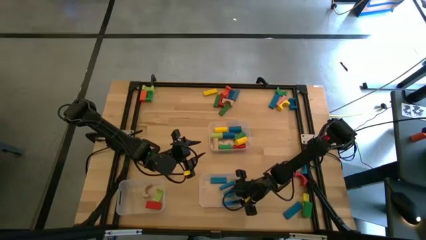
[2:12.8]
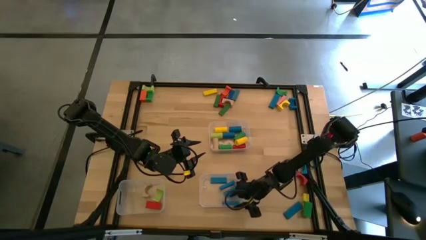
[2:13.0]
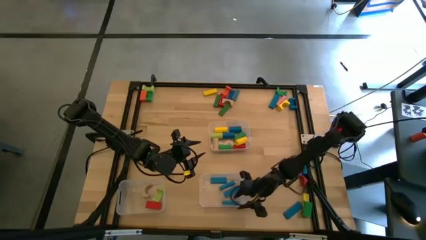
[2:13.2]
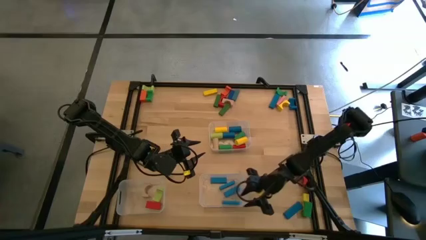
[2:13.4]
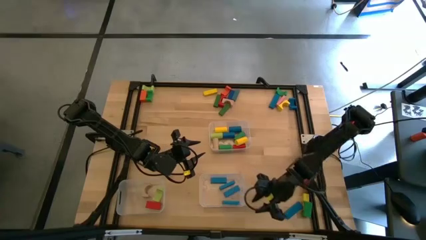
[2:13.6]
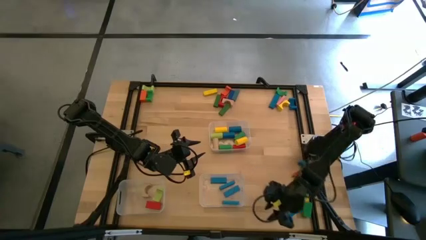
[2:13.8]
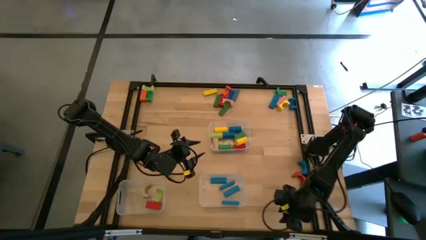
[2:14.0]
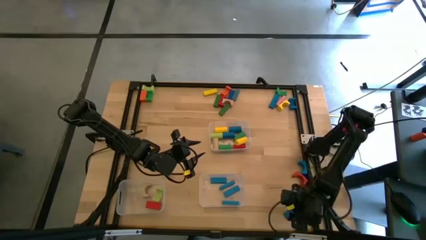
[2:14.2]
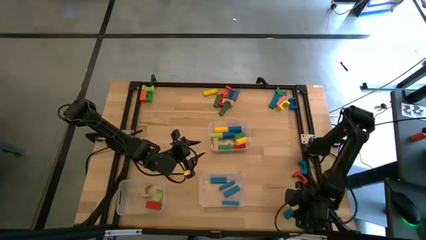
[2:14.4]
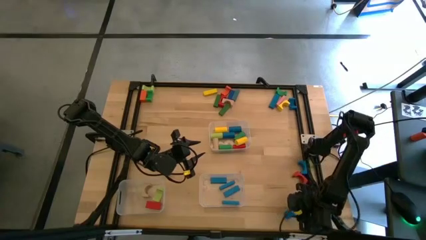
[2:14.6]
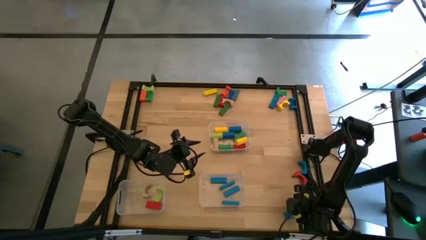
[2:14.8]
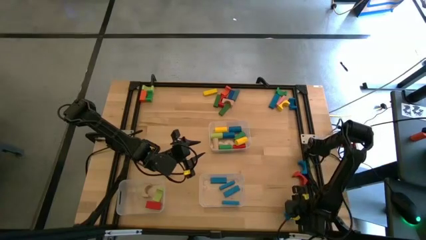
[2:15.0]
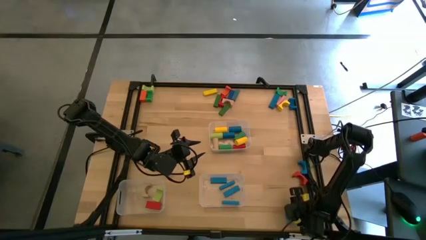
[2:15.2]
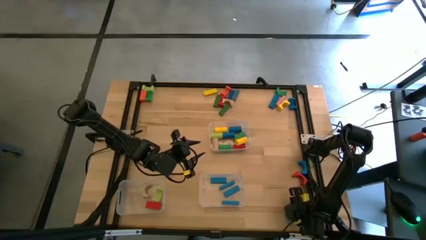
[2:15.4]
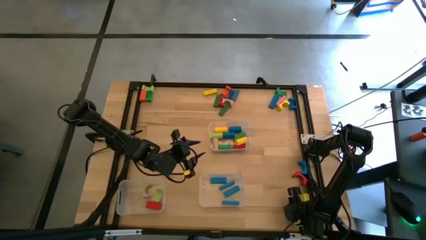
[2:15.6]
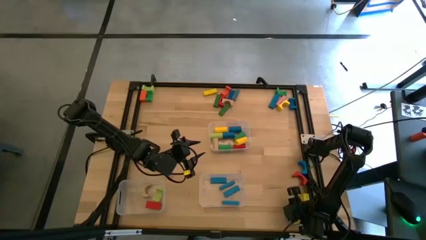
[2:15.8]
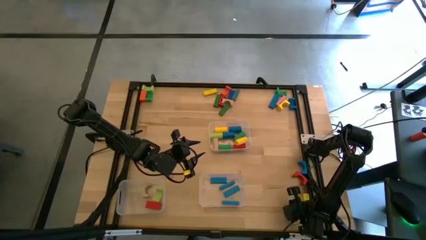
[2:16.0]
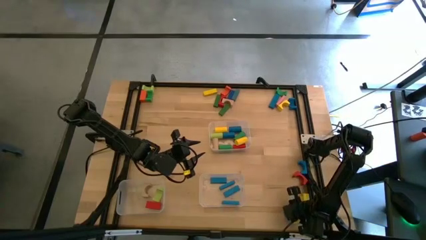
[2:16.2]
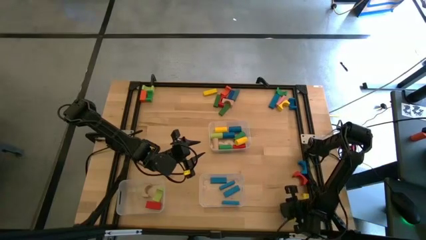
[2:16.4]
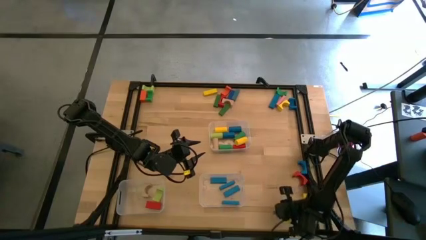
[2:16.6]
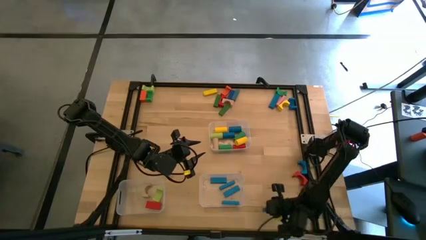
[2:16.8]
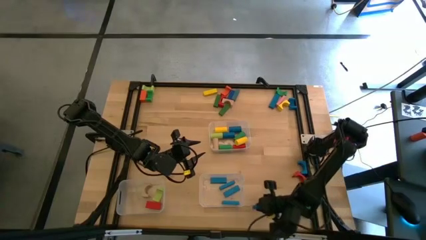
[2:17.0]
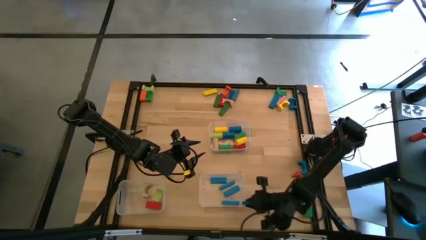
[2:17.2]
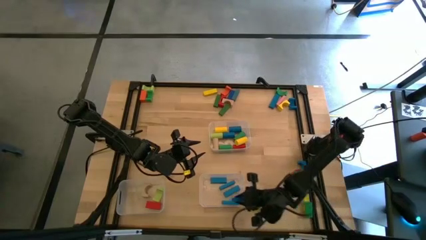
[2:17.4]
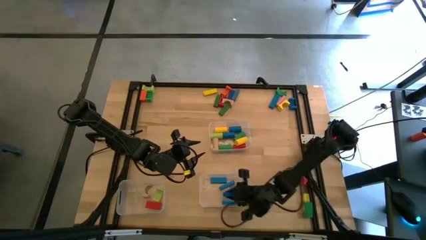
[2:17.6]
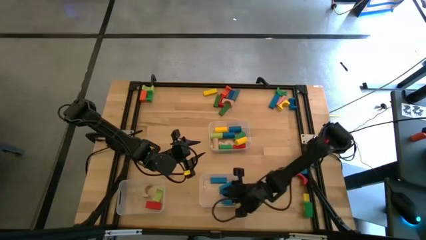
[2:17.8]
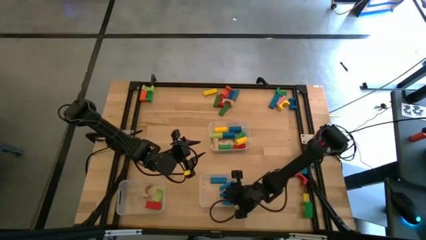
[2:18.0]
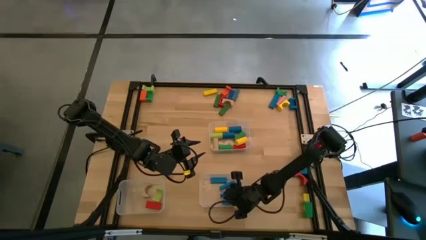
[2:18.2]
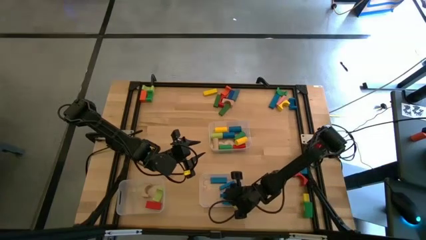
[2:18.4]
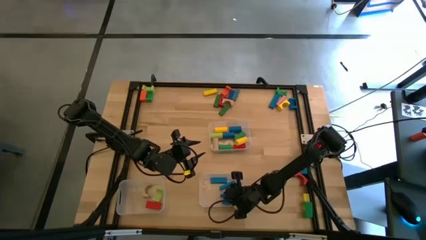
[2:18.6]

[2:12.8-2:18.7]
Task: Sort blocks by size
Put the blue rectangular block into the bottom right transparent bin

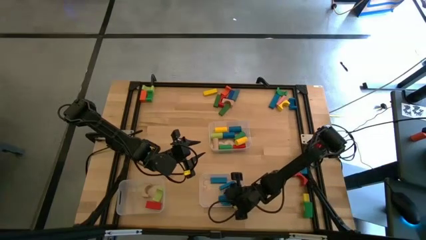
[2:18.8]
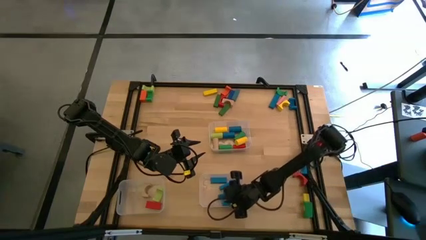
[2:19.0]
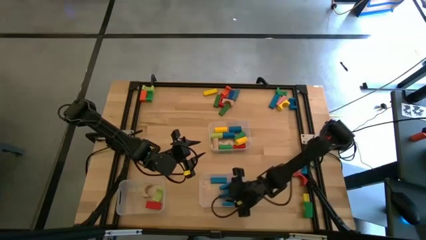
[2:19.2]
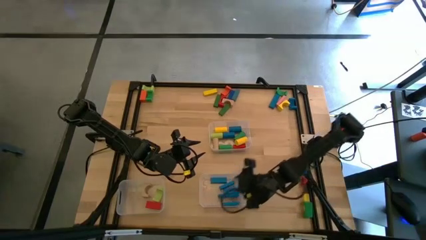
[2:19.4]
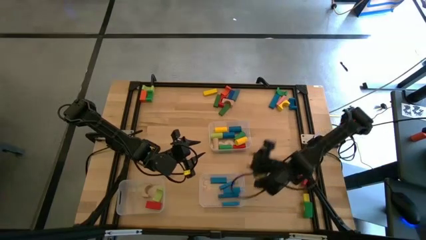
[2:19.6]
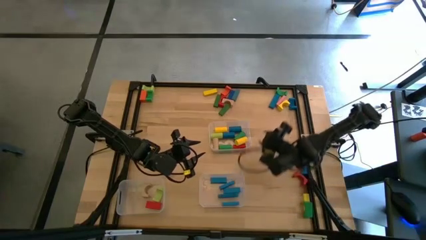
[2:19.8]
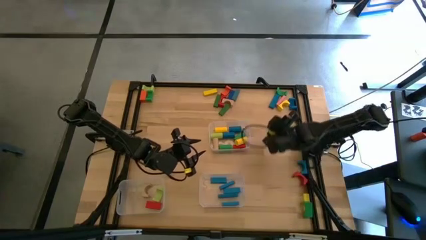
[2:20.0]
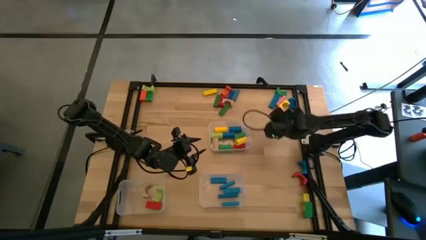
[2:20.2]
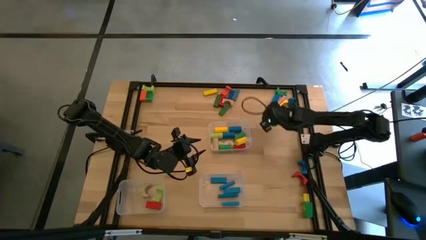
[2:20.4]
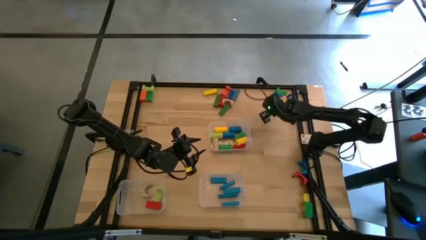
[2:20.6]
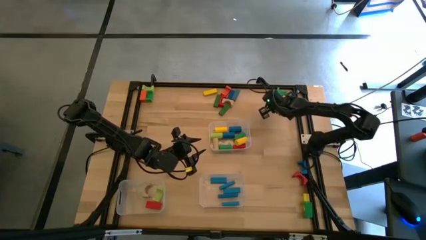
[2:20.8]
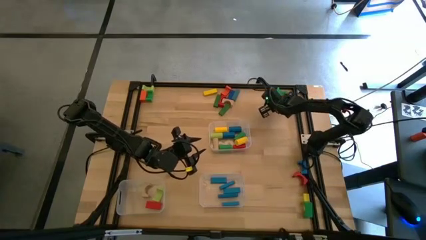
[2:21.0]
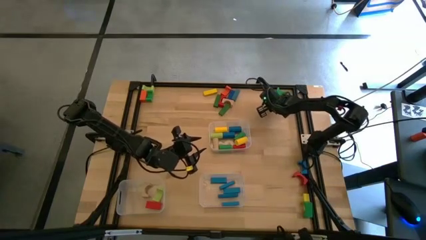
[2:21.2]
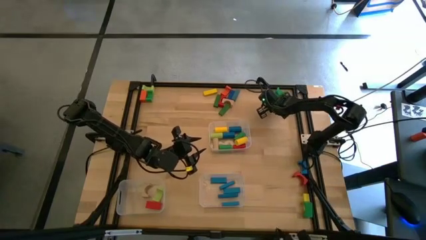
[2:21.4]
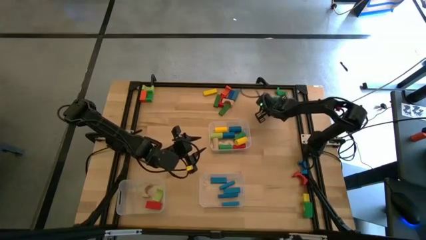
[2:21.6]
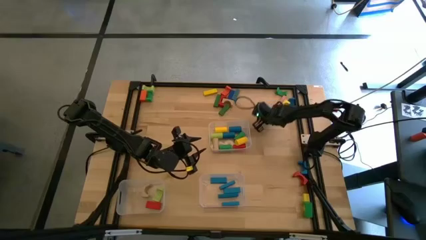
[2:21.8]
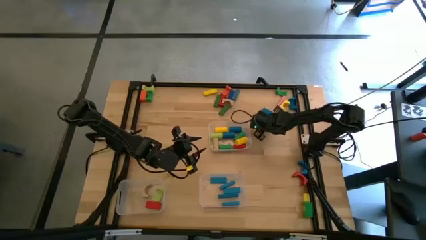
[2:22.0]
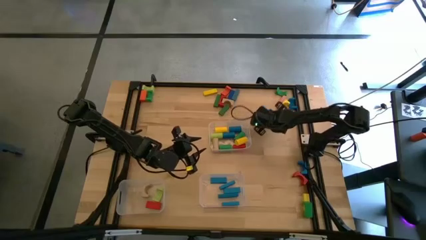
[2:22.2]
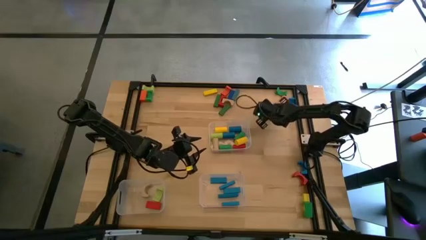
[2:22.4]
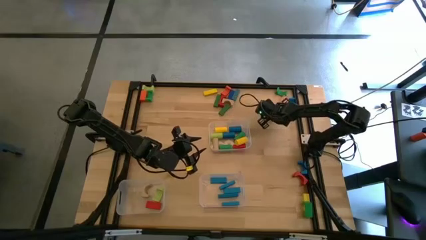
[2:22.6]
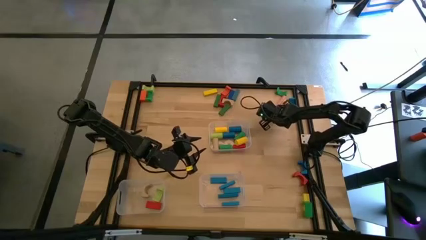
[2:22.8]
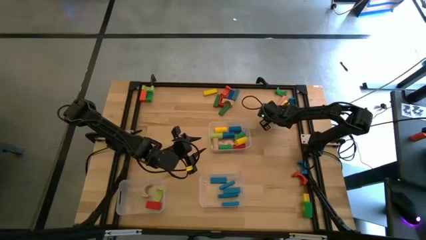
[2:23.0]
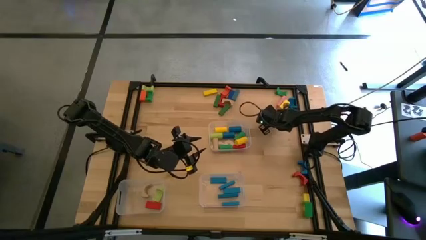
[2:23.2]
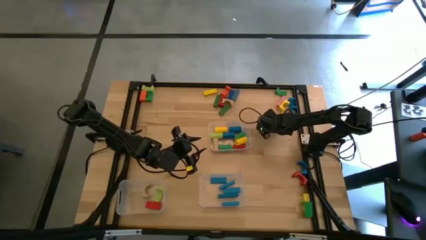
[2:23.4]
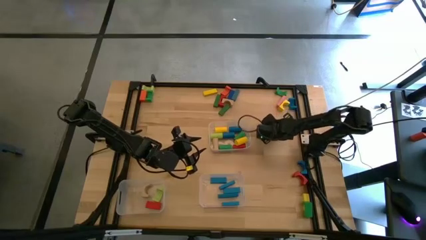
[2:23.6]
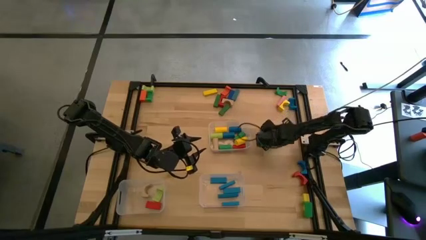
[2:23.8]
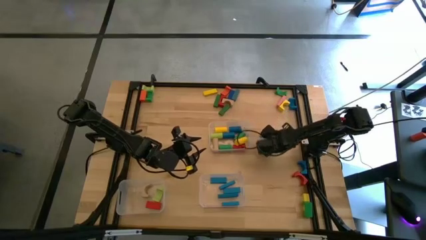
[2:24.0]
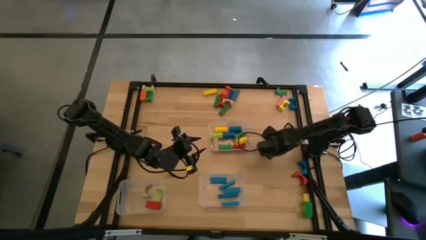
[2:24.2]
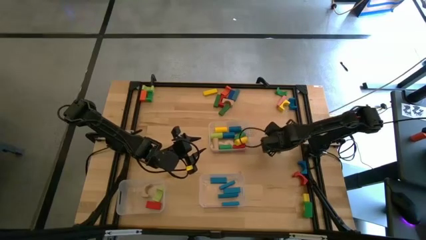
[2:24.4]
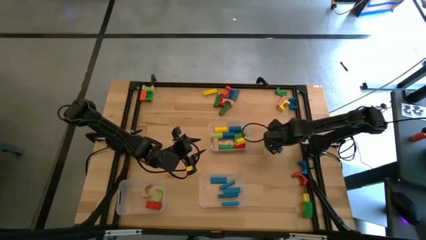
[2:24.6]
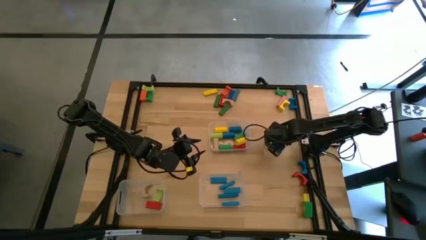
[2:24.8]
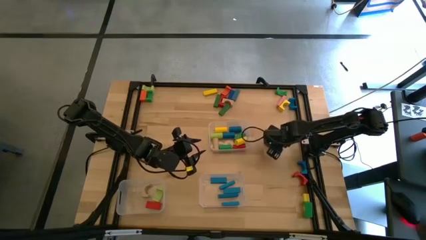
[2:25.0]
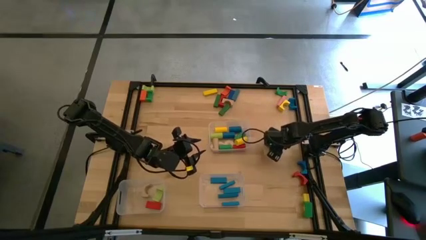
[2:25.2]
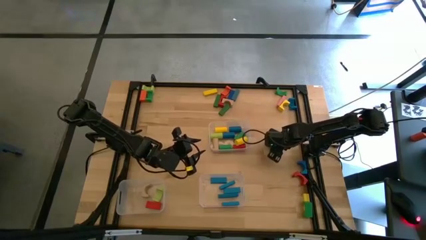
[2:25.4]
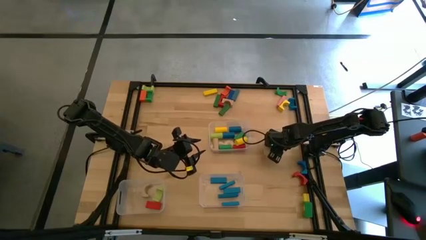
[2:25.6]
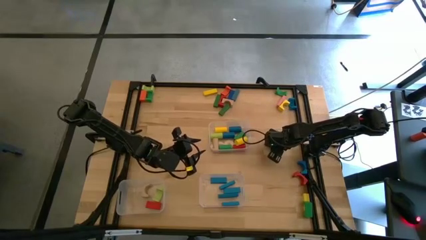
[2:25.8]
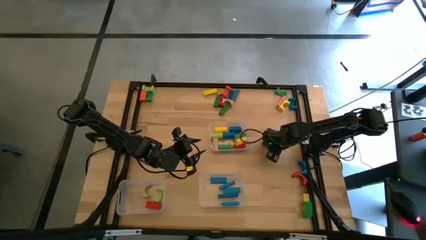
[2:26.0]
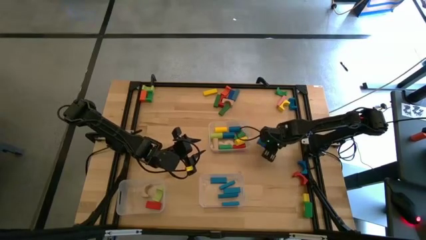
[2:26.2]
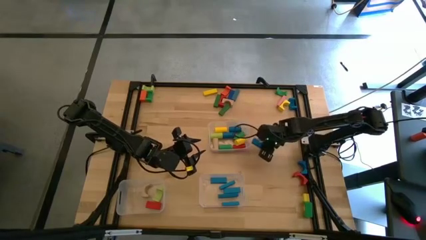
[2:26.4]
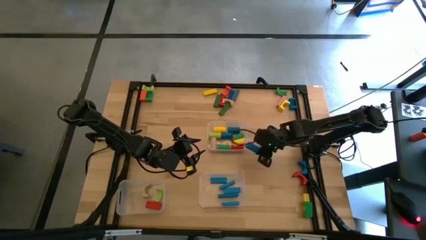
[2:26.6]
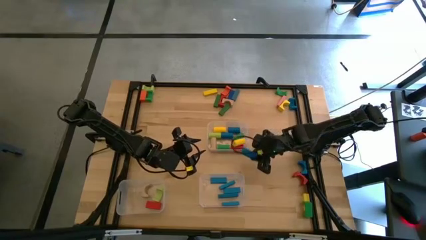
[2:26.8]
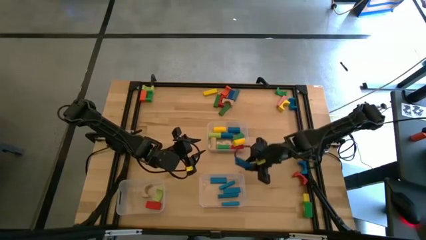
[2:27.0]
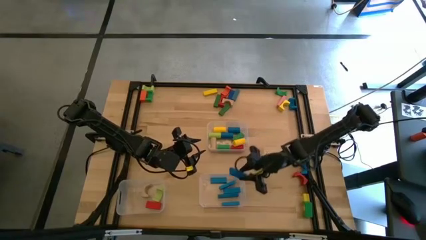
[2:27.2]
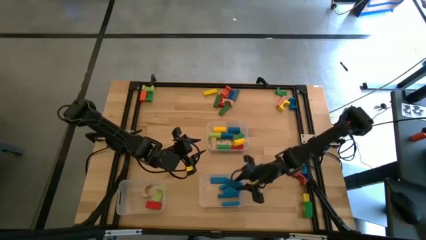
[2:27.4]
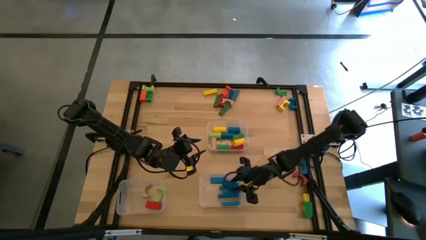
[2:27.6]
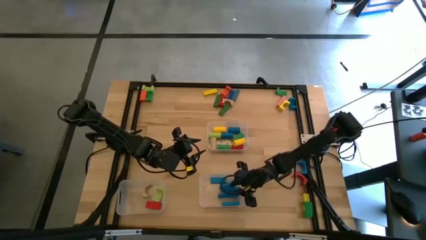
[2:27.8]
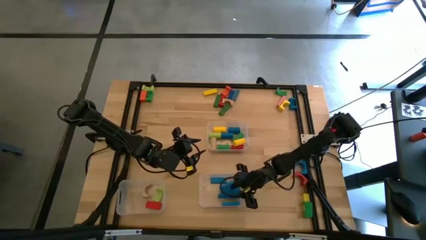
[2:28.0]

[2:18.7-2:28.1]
Put the blue rectangular block into the bottom right transparent bin

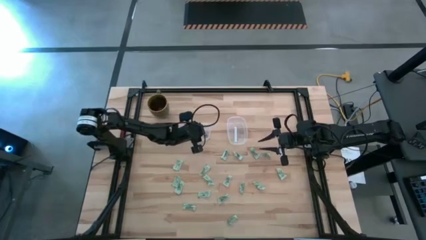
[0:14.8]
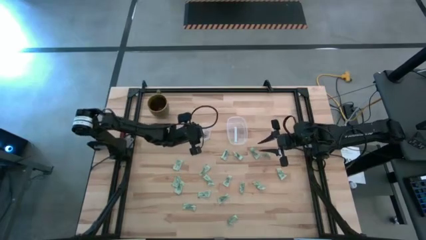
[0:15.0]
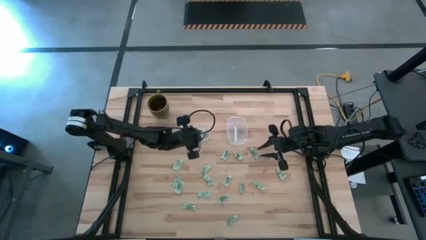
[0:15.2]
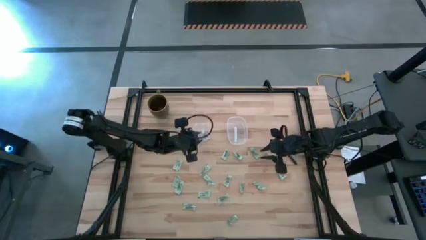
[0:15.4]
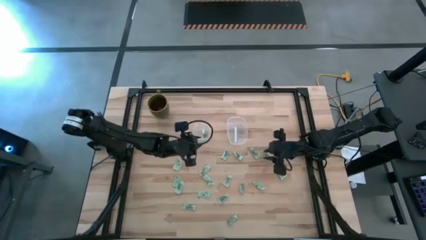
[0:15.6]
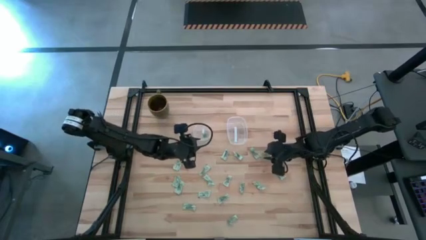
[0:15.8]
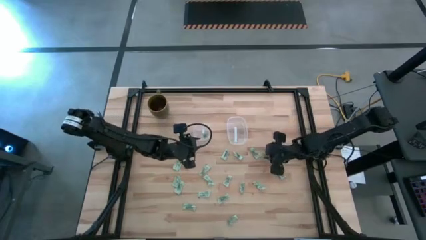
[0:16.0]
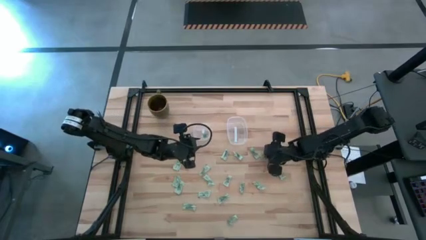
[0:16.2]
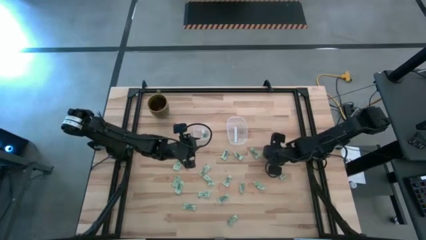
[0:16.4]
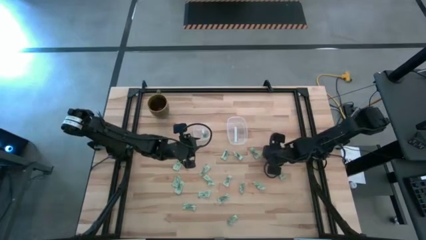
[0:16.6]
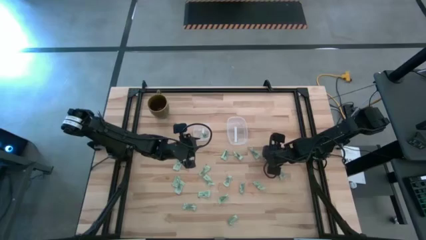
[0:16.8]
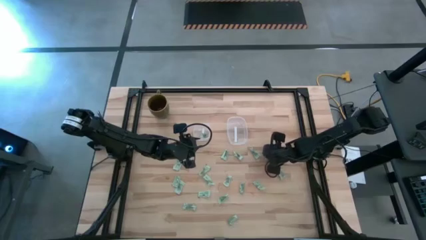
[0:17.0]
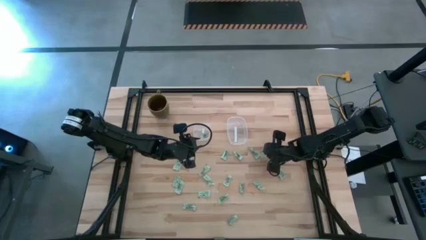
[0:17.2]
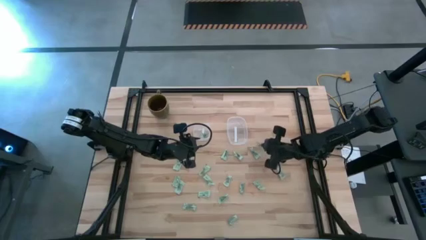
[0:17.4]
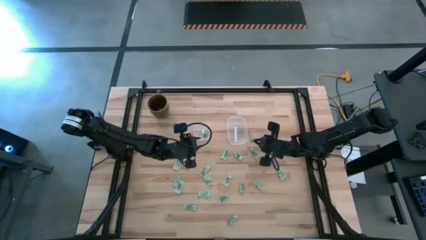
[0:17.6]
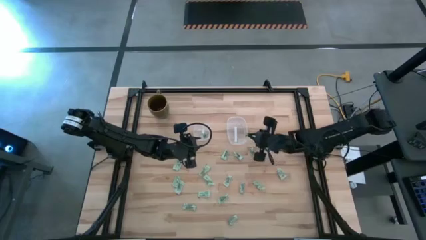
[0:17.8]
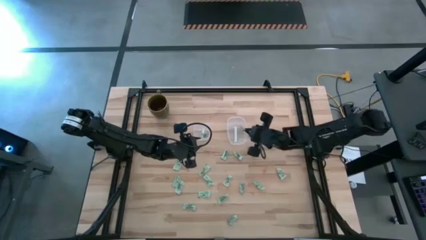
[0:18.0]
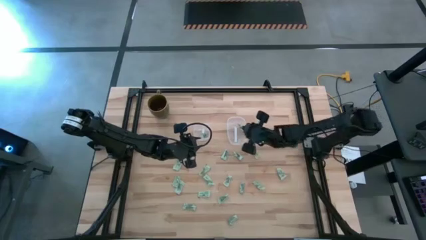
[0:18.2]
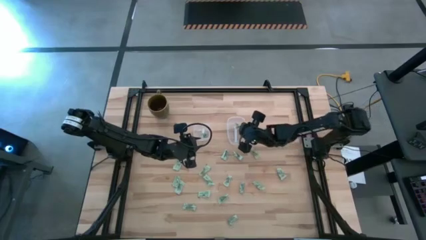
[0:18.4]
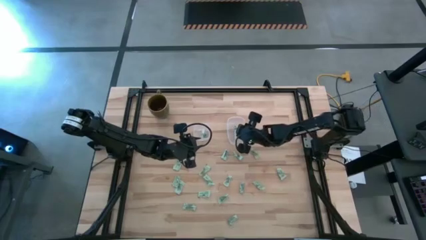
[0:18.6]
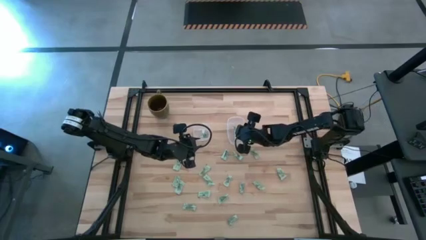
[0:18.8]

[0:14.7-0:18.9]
Task: Pick and place items into bin
Put the light green stevia packet into the right transparent bin
